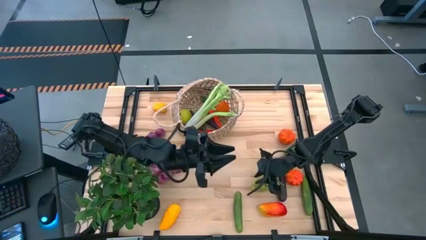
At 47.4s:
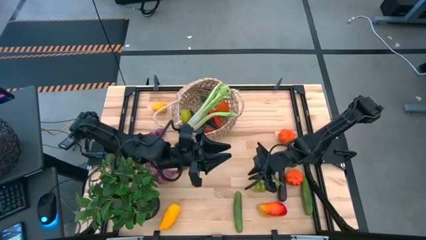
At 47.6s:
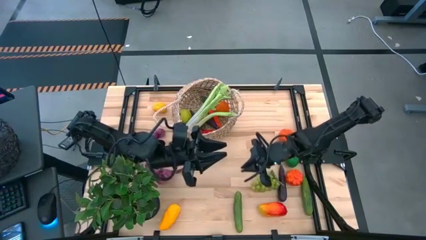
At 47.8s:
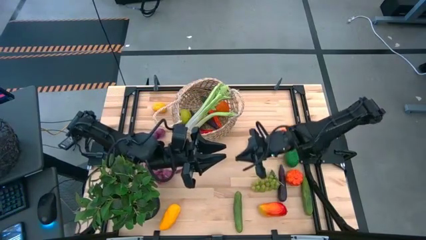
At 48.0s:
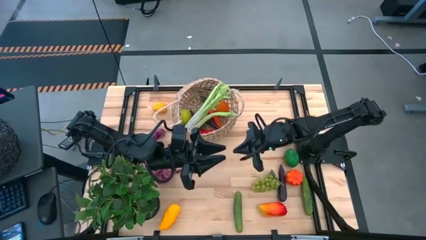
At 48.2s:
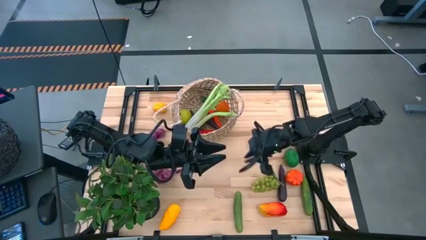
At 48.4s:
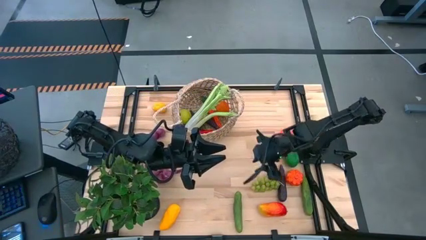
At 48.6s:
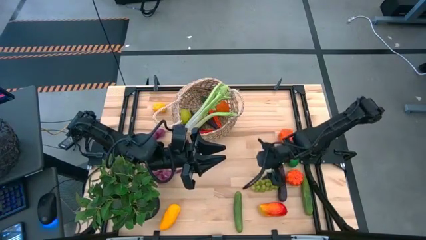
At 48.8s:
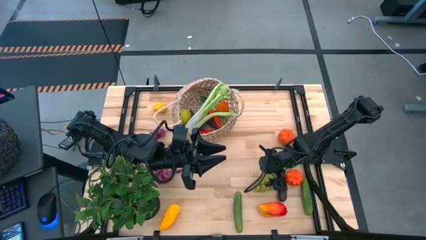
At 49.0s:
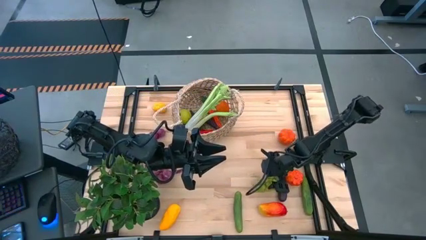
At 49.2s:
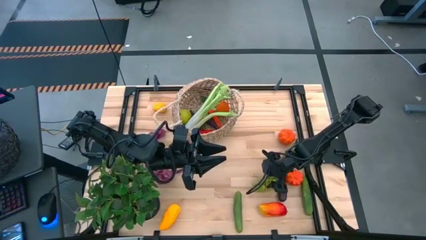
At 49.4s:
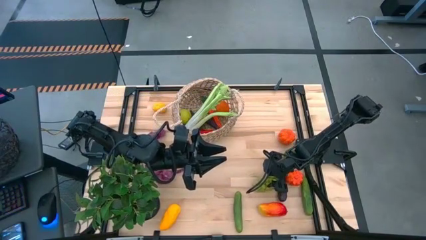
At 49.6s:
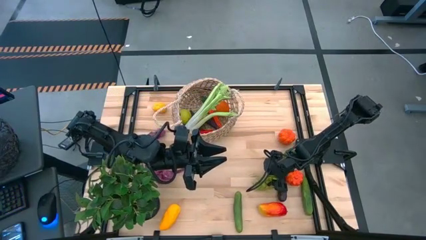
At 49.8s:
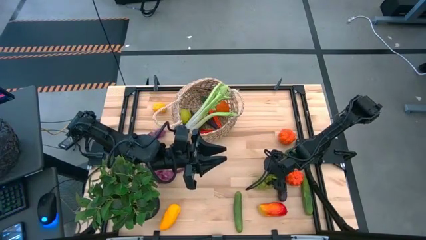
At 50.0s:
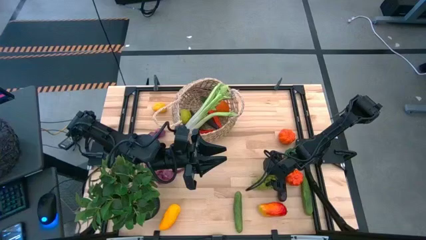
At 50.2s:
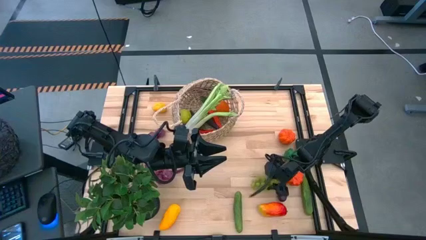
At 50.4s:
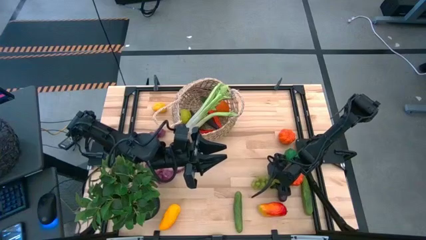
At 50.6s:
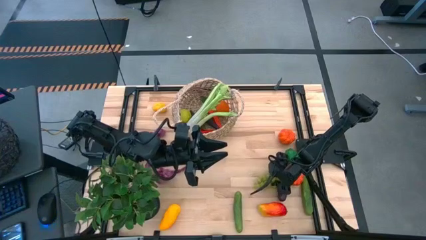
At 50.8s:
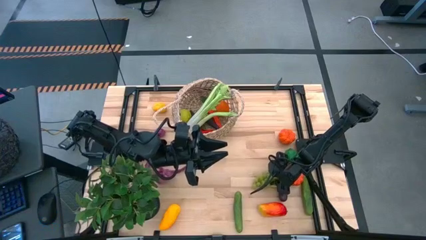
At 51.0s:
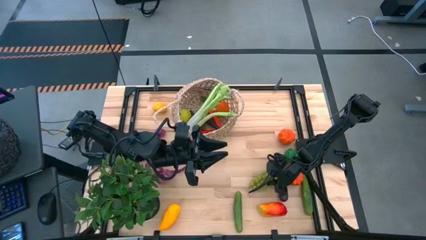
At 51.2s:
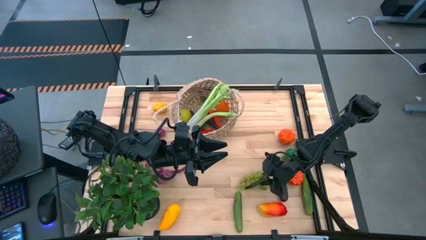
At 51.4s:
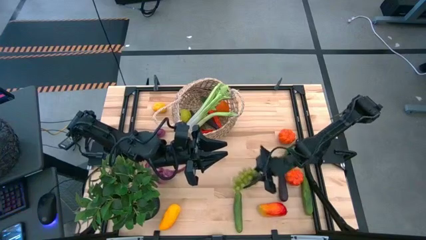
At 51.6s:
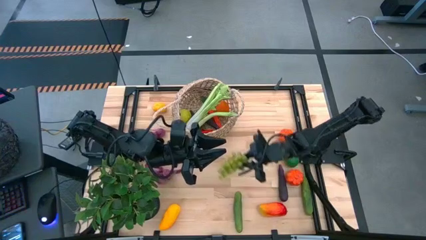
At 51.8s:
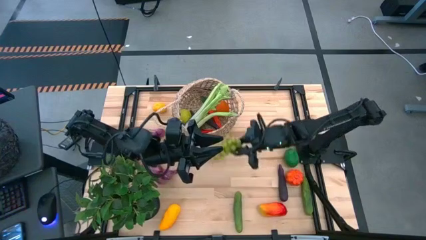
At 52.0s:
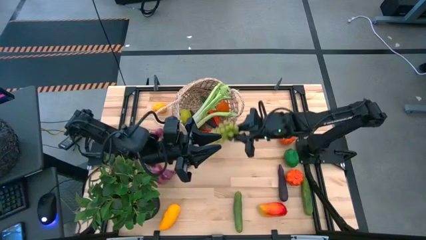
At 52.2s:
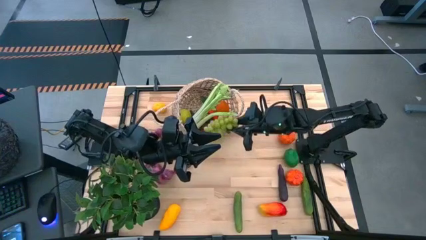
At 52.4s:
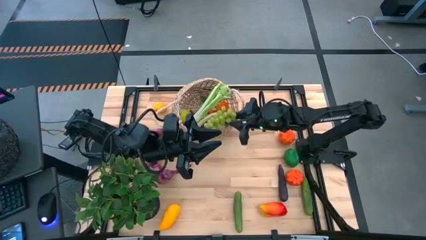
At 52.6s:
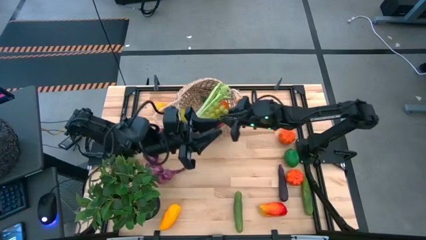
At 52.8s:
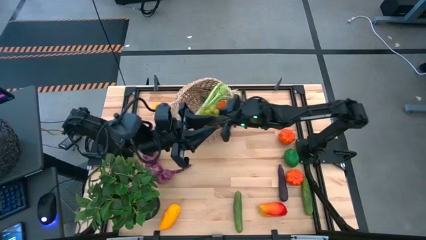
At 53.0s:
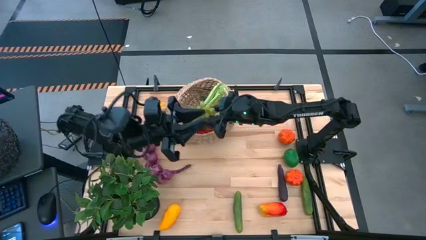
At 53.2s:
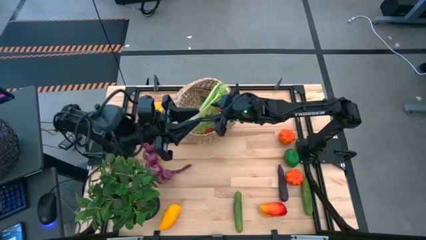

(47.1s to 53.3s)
Task: Build produce basket
Put the green grapes into the brown basket

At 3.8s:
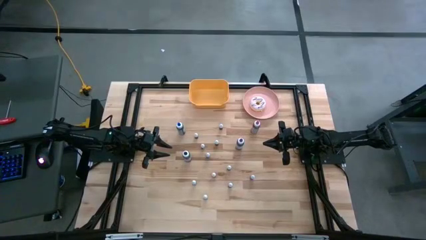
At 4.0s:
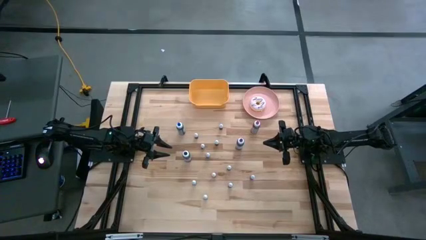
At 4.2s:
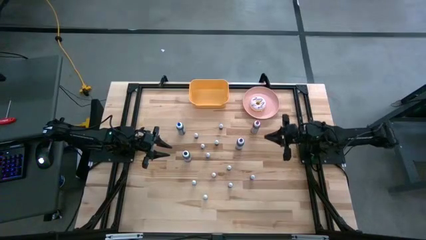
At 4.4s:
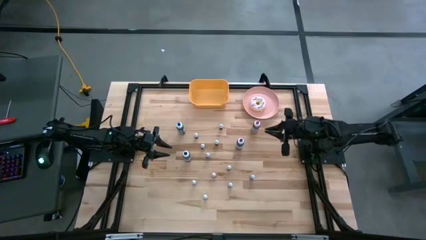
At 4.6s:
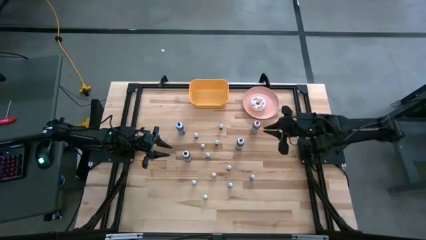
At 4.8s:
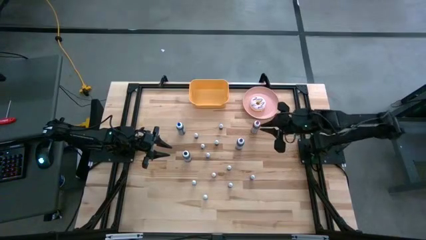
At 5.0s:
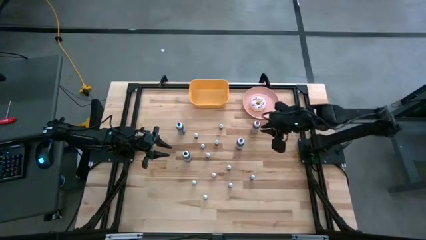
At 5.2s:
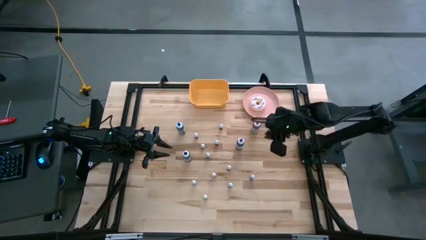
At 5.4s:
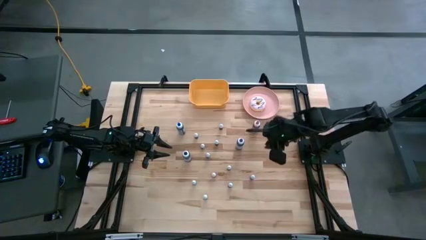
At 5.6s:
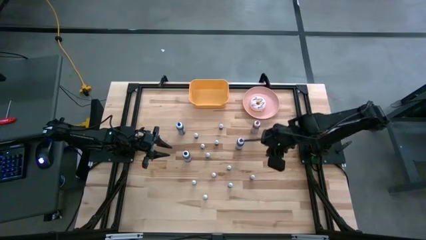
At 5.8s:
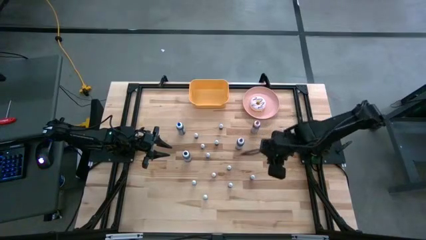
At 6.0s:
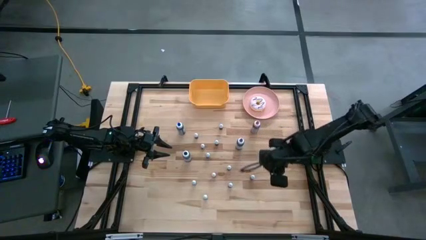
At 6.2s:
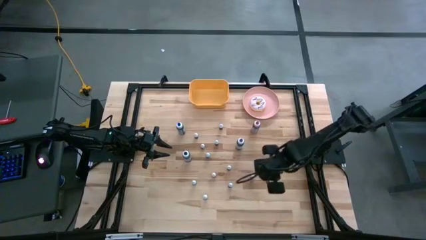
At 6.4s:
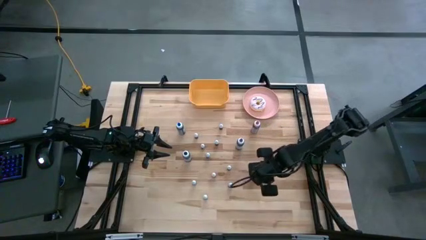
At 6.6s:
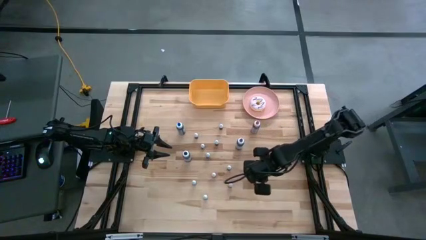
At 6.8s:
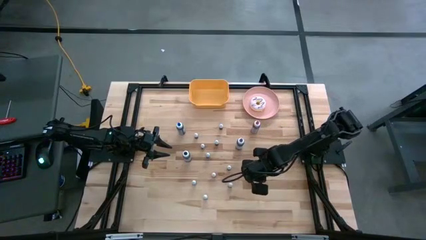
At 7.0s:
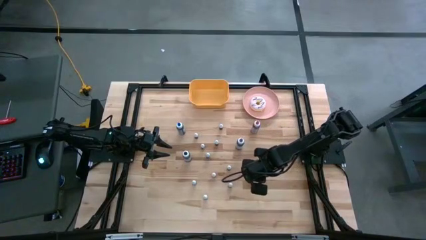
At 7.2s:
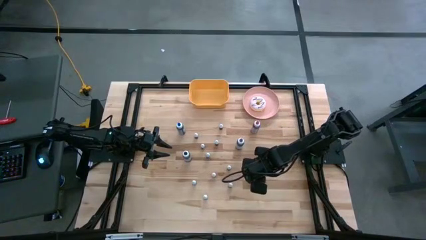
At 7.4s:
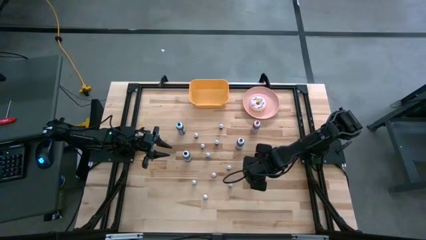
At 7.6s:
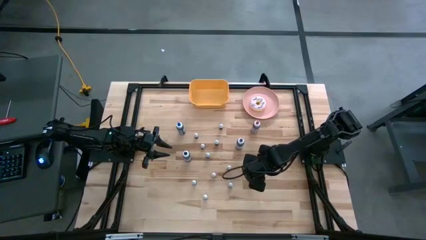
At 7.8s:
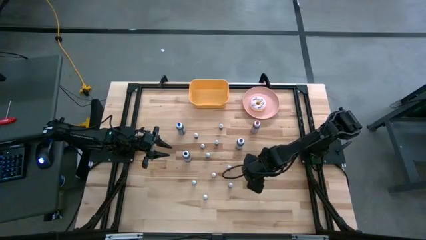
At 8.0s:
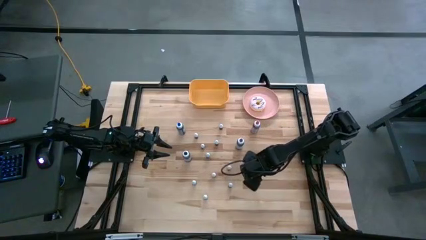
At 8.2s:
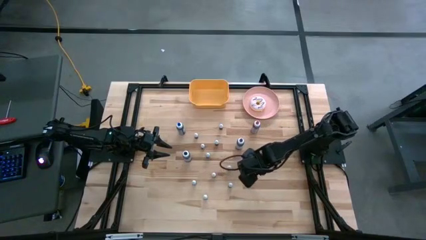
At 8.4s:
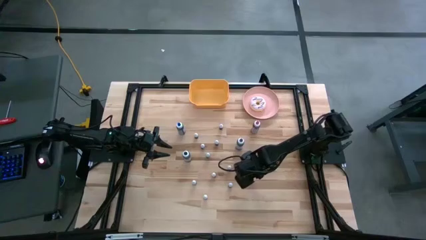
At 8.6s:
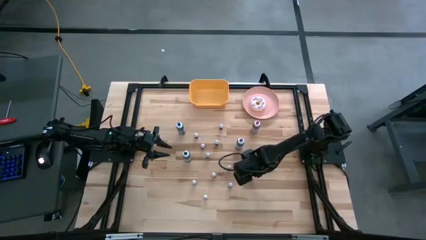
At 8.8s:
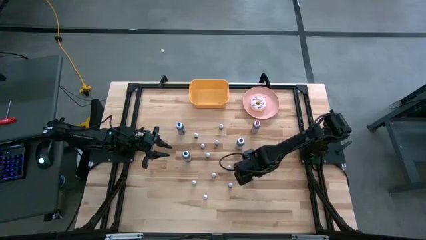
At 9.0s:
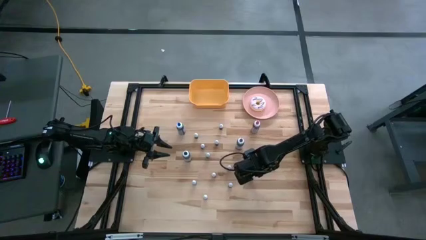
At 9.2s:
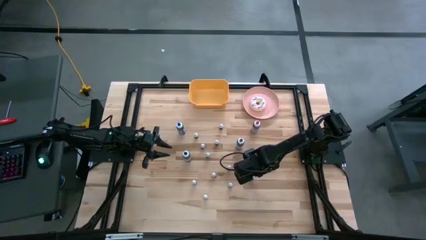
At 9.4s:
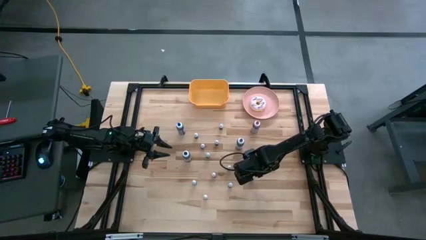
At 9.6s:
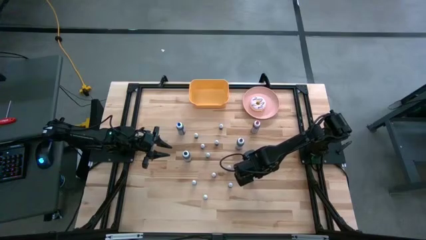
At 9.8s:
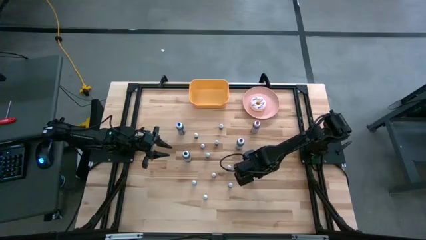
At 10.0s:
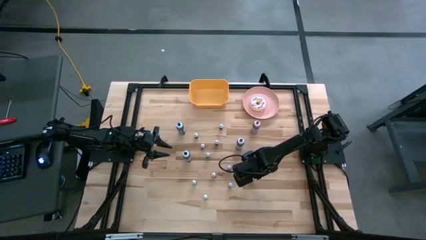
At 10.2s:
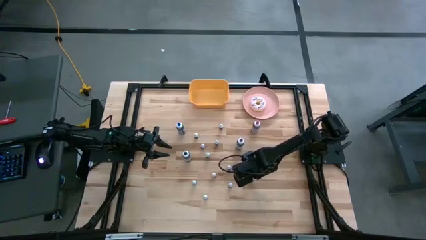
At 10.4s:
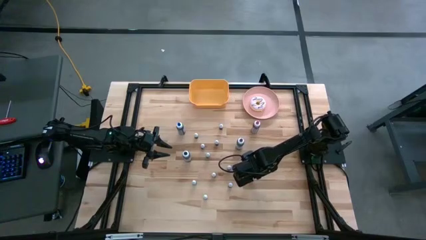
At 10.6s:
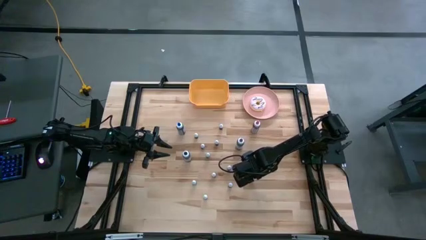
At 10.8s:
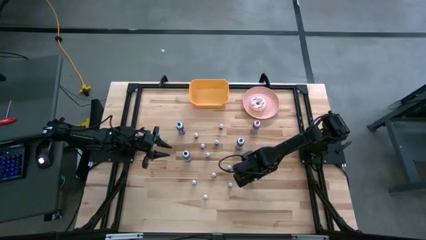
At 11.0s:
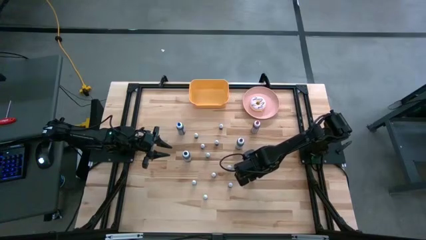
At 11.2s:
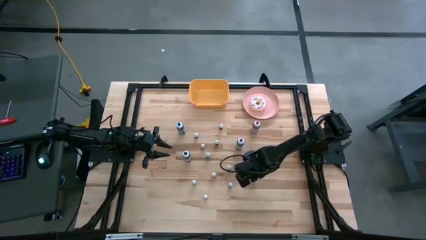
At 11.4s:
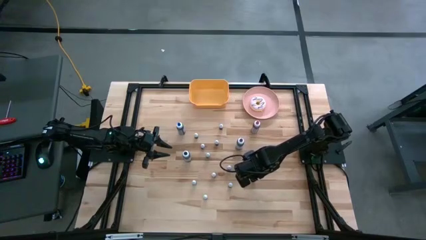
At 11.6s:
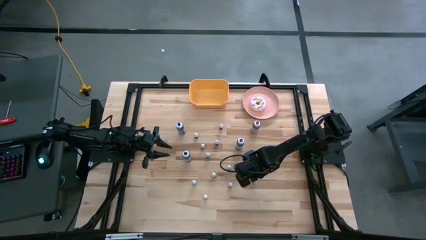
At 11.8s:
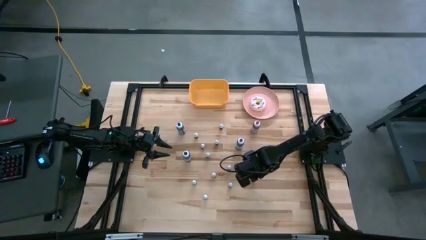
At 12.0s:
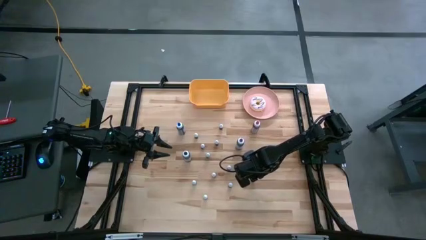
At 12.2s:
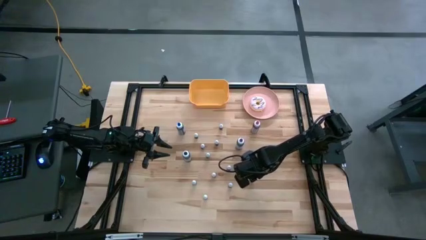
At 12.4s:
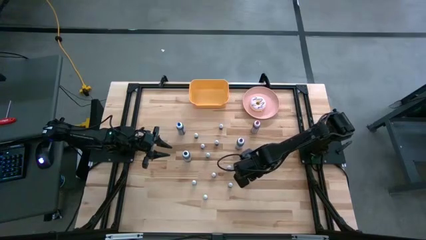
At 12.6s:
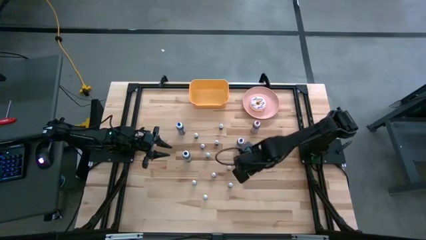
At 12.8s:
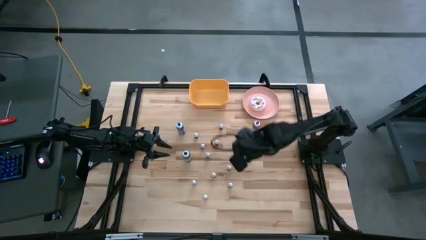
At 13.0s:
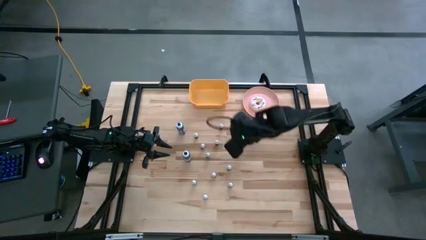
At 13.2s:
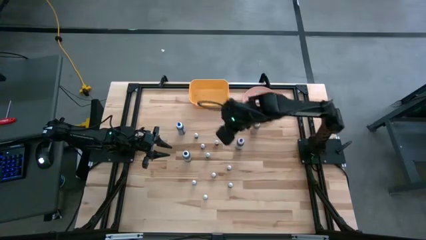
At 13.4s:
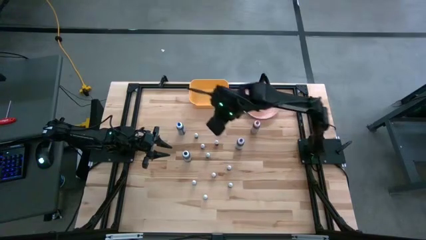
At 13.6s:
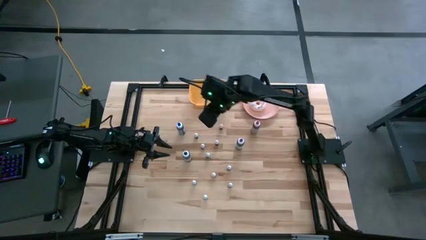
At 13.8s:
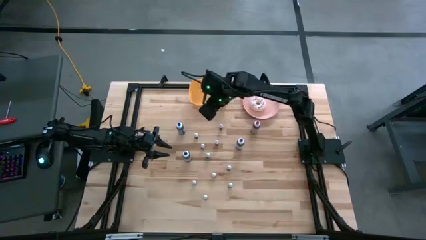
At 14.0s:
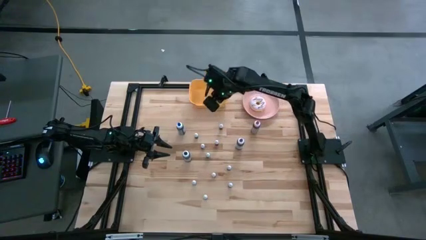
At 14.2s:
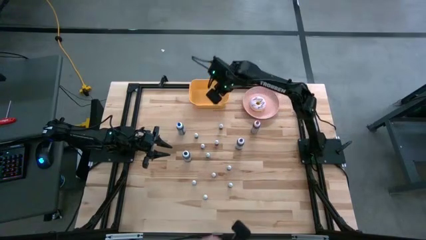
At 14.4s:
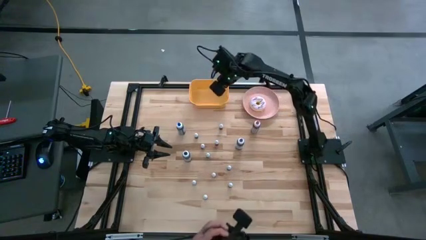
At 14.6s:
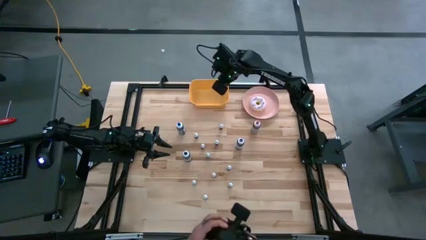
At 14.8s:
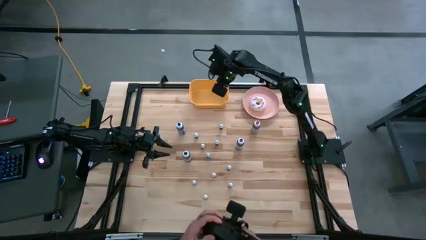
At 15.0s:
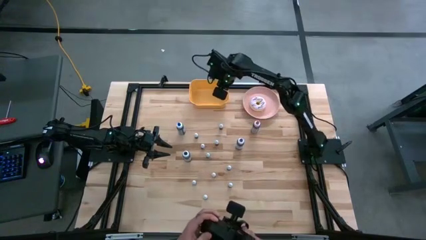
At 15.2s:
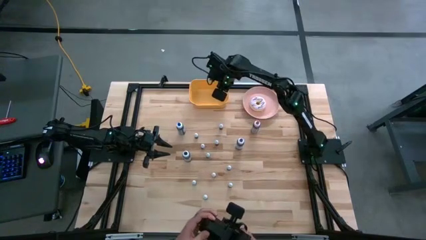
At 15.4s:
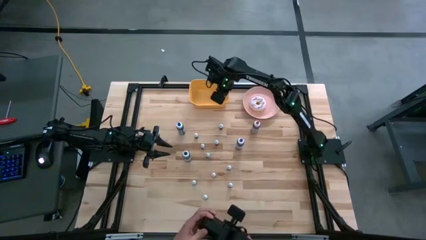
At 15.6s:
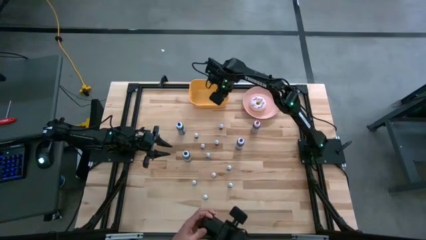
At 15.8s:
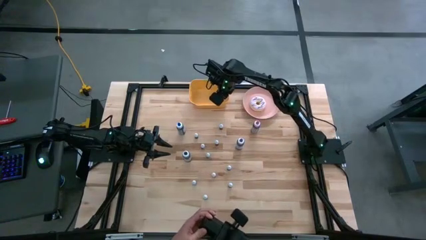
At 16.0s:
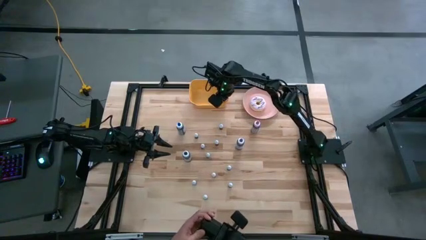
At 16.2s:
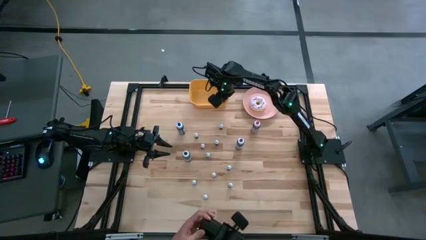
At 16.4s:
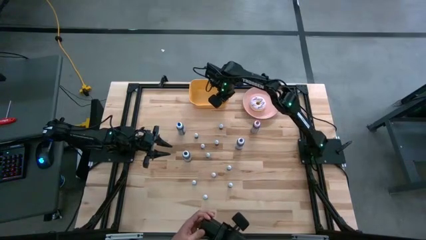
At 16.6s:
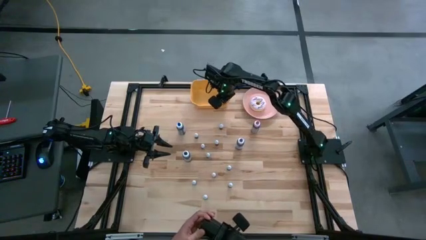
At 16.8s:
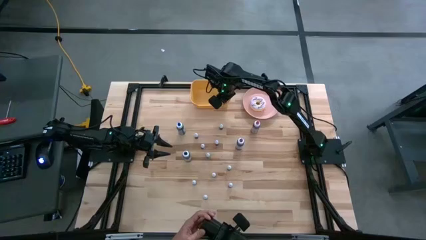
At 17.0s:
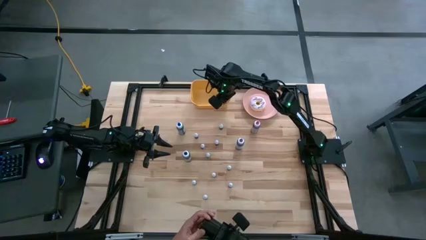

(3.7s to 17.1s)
Task: Pick & Place food coloring
Put the small orange food coloring bottle into the yellow bin
